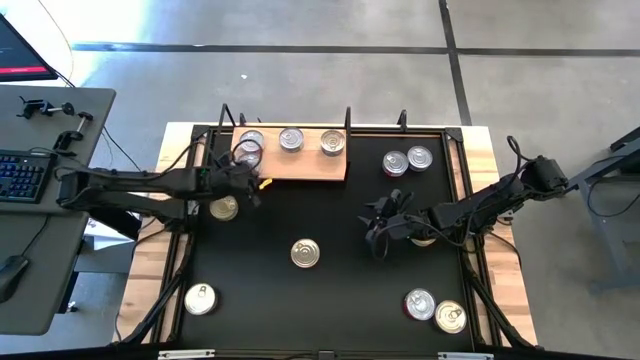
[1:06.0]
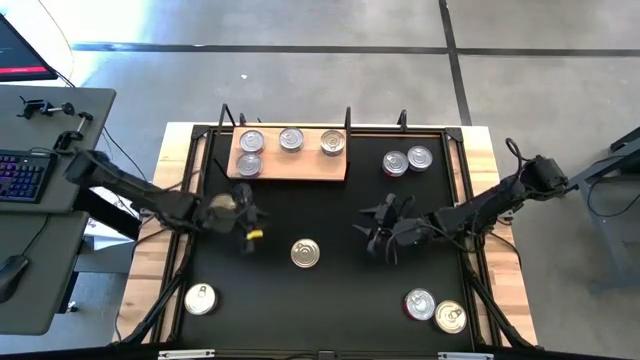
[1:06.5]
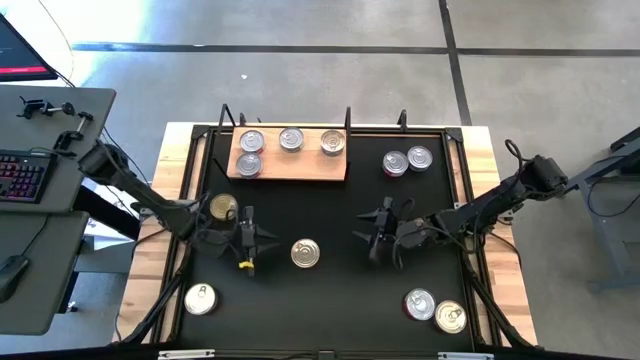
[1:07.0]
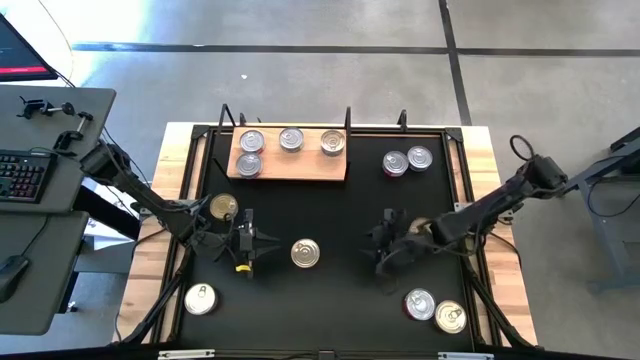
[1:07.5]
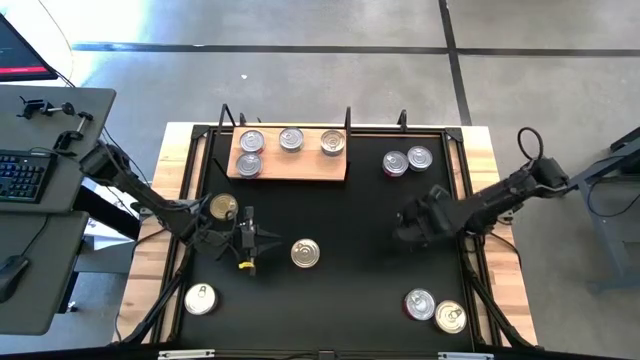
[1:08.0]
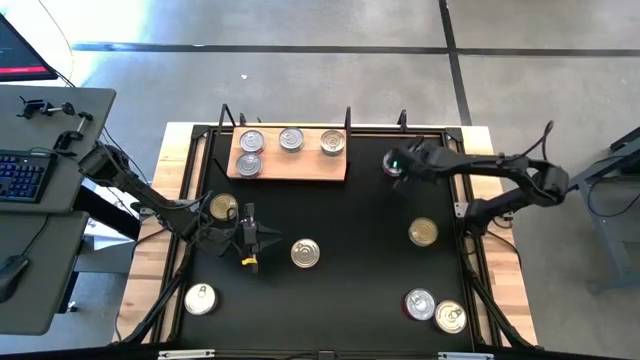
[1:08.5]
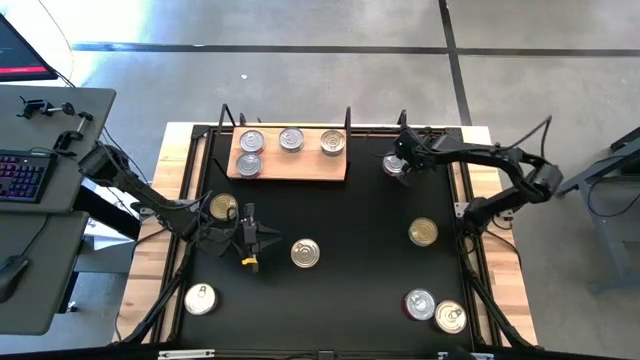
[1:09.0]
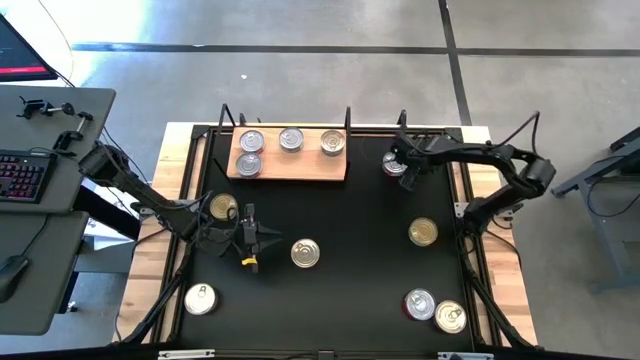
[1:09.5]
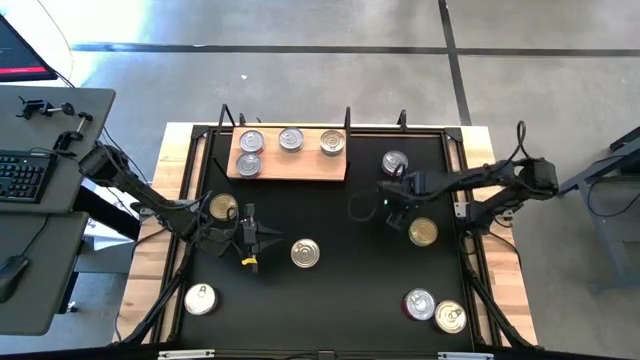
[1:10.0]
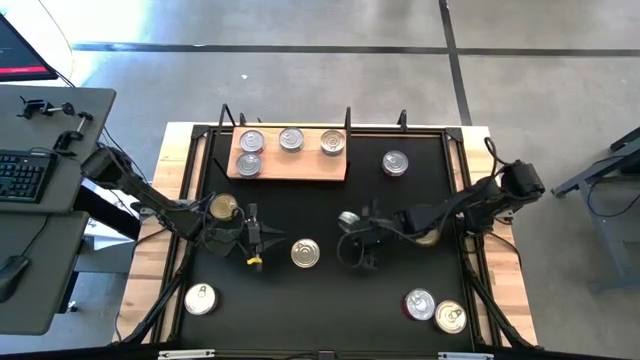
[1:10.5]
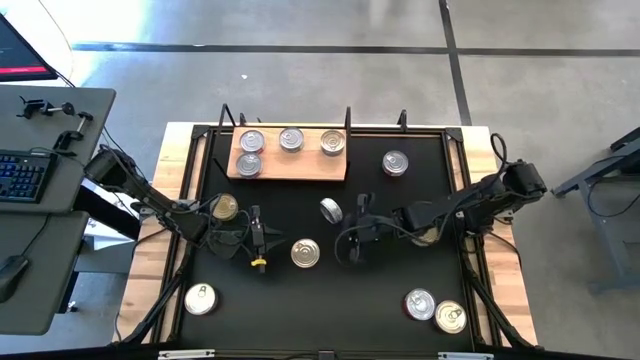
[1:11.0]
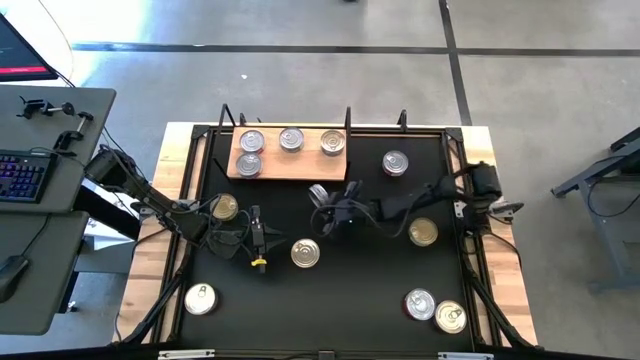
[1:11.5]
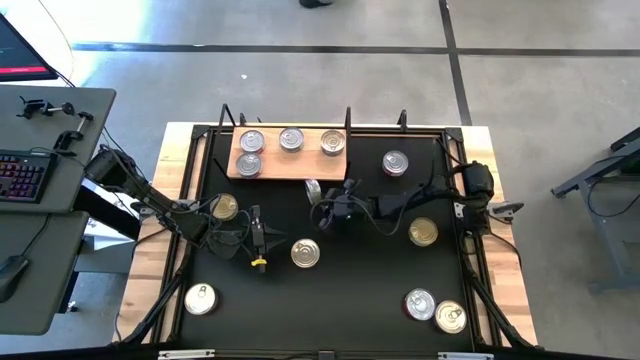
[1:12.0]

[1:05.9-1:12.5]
Task: Stack canned seafood by type on shelf
Put the green tuna can on the shelf aligned with the green tuna can

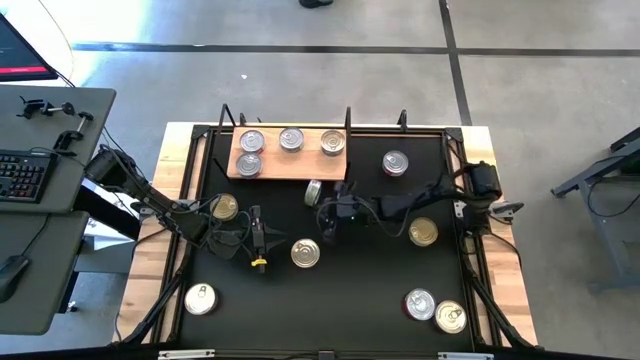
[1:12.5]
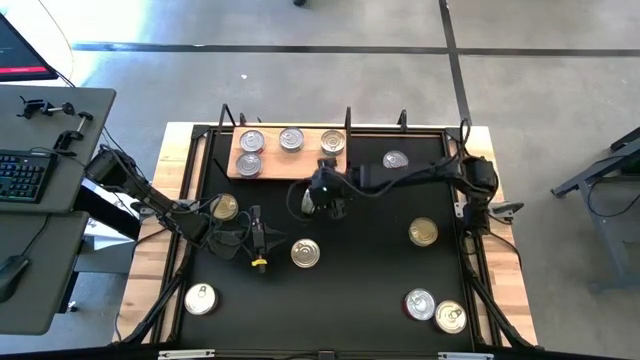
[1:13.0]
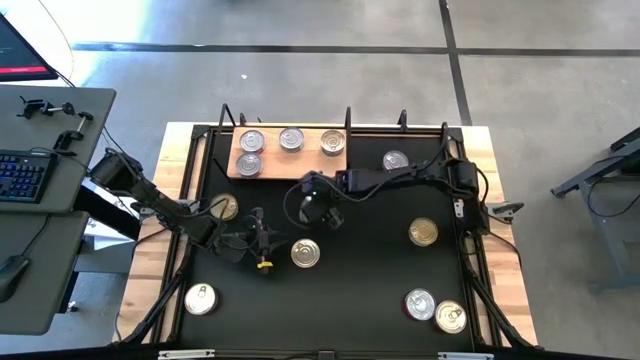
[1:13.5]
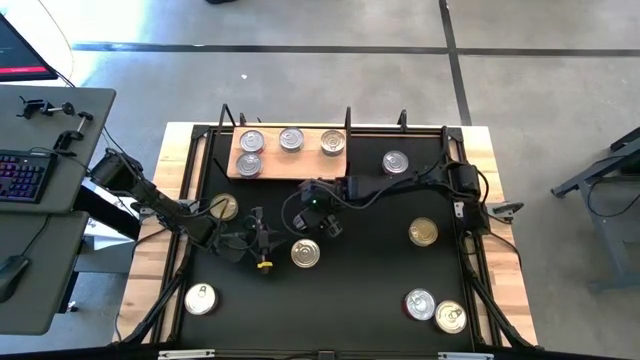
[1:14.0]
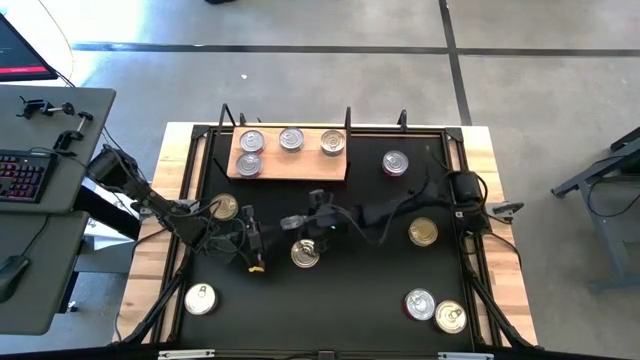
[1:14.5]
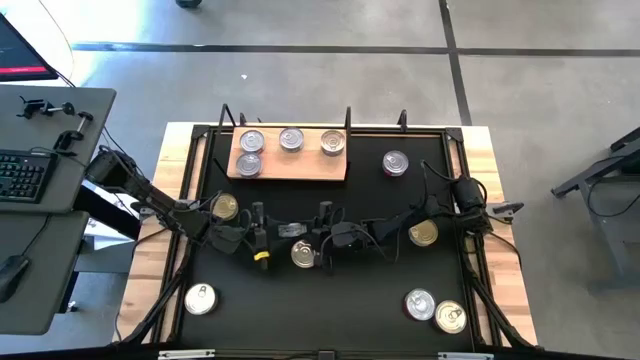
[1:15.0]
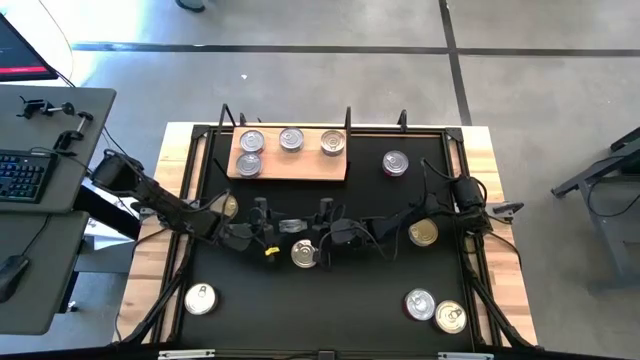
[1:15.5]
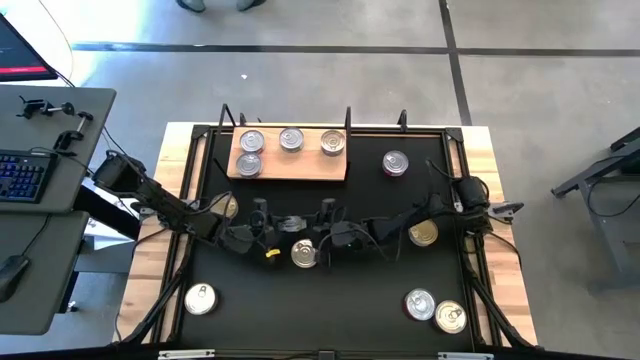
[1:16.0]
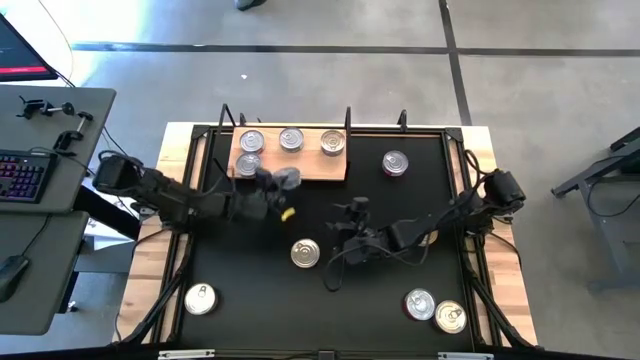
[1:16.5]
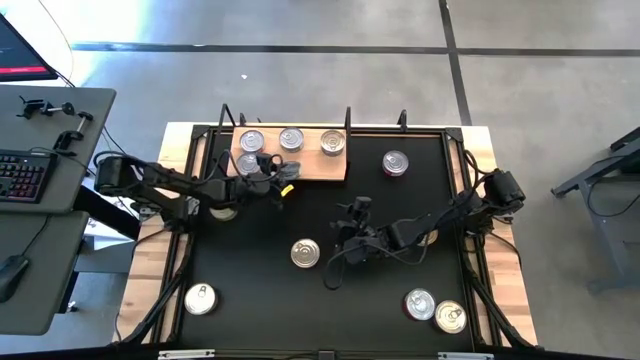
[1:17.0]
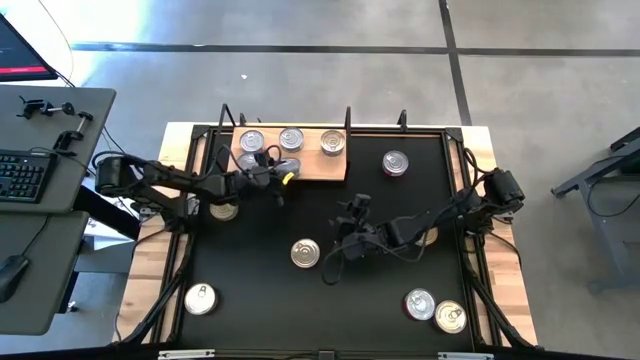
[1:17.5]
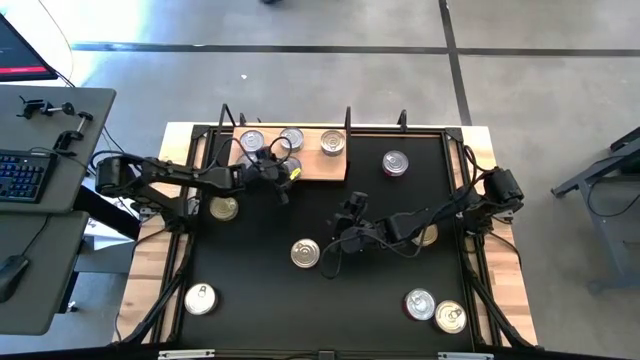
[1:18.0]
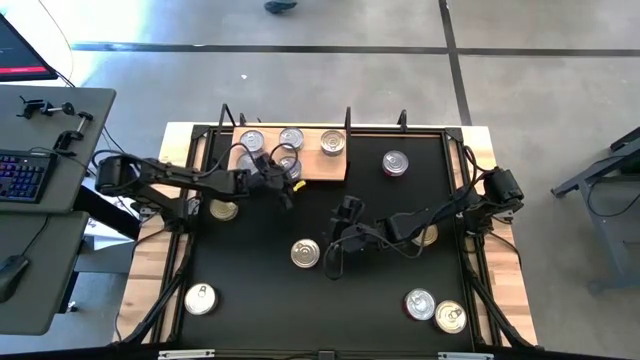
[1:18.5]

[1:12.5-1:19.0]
Put the green tuna can on the shelf aligned with the green tuna can

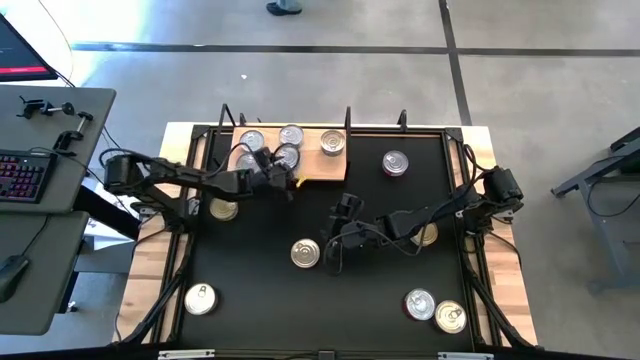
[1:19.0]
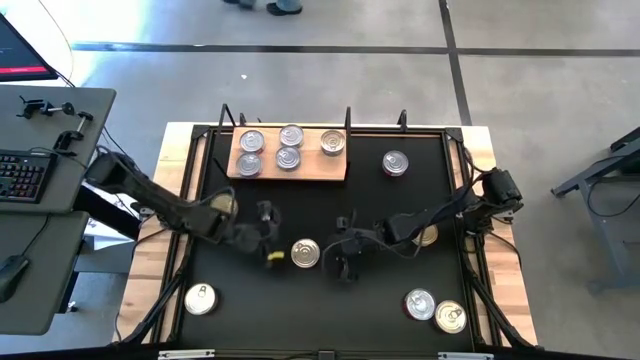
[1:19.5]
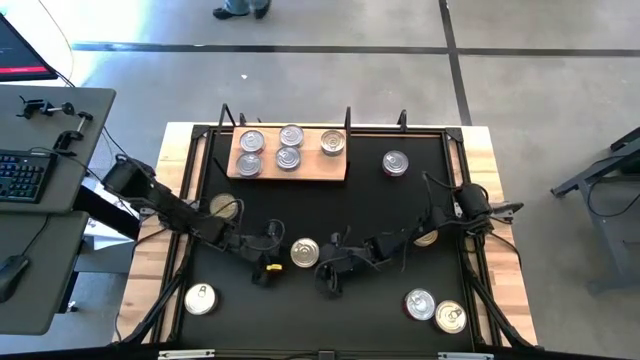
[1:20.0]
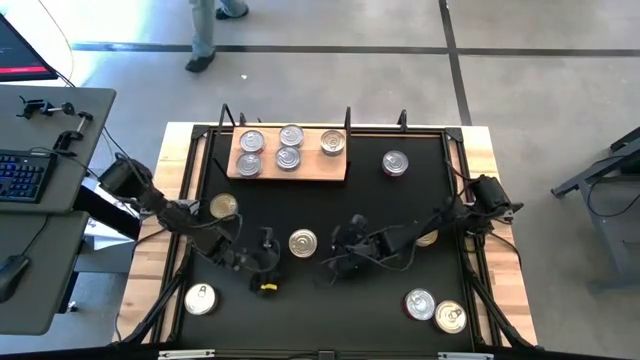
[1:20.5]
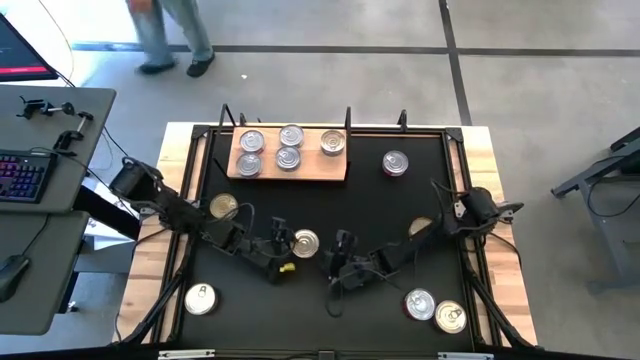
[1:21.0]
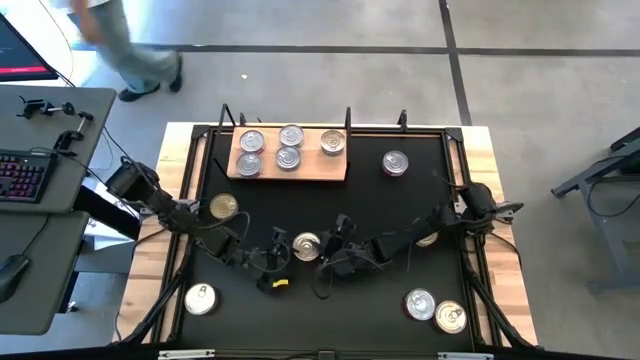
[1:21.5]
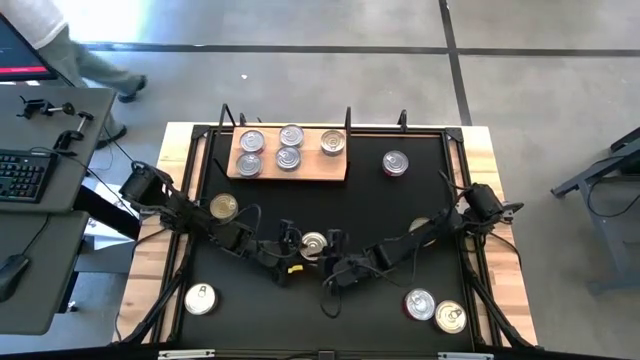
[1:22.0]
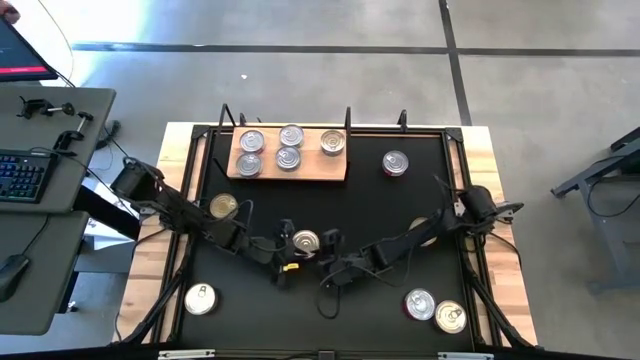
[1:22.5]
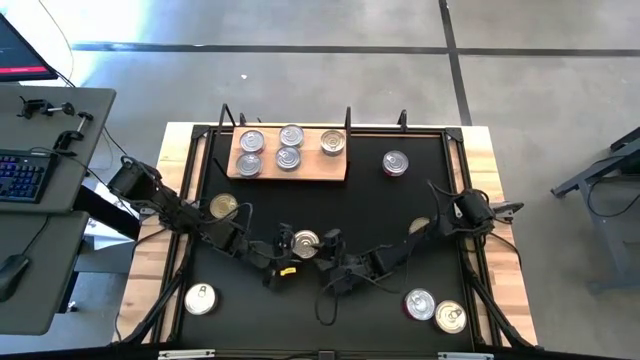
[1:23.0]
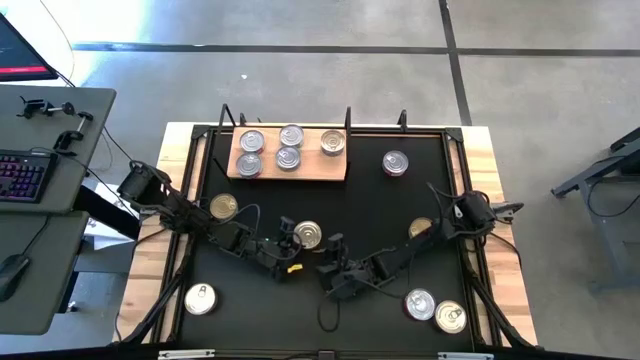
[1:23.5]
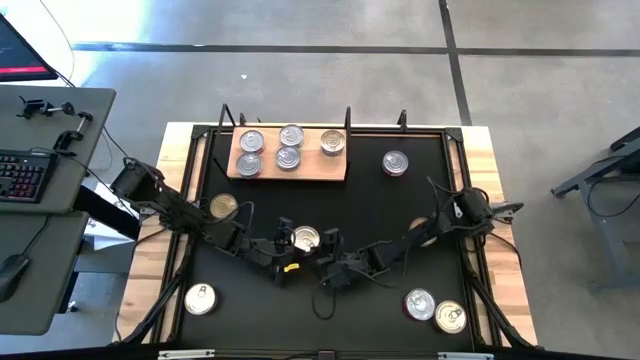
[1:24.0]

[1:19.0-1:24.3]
Put the blue pink tuna can on the shelf aligned with the blue pink tuna can

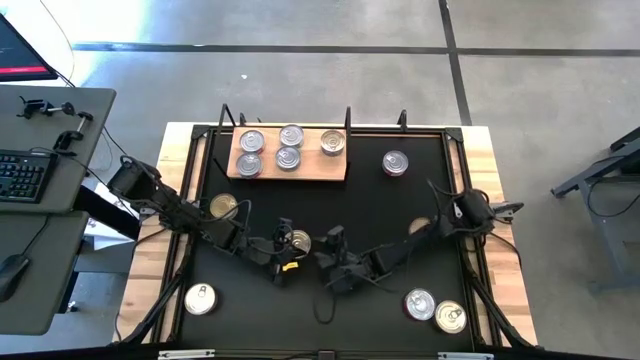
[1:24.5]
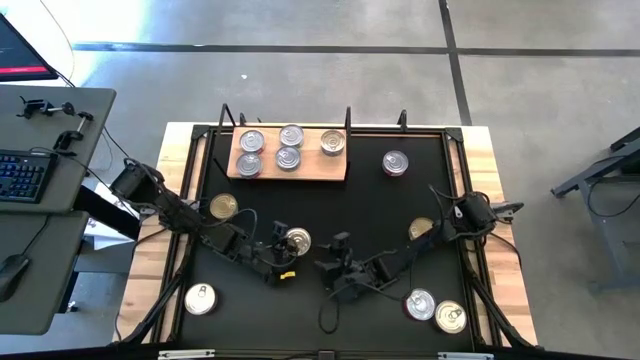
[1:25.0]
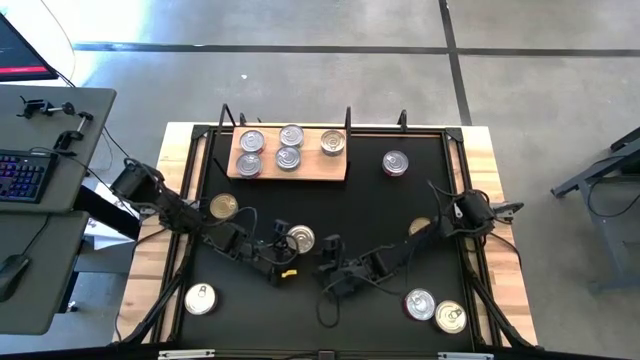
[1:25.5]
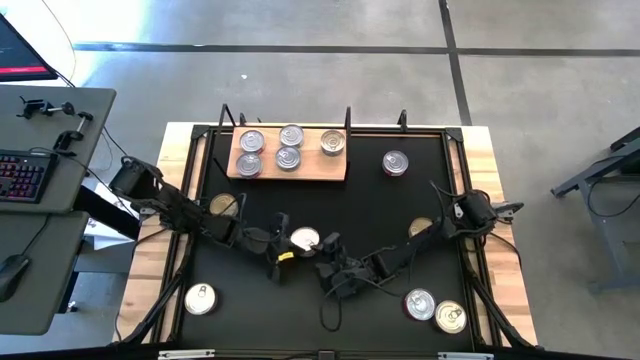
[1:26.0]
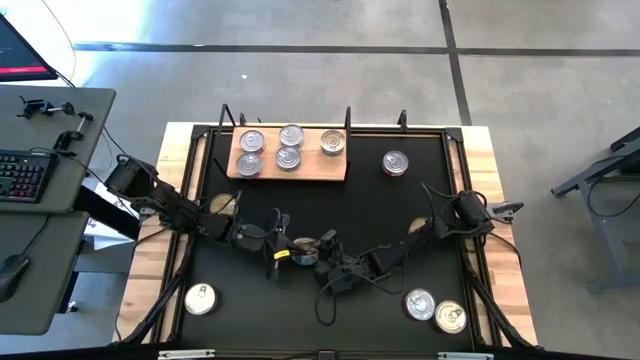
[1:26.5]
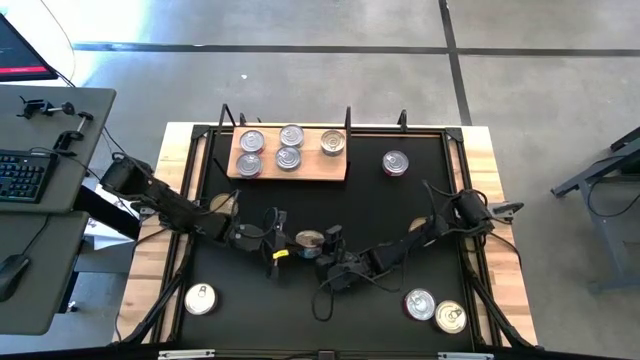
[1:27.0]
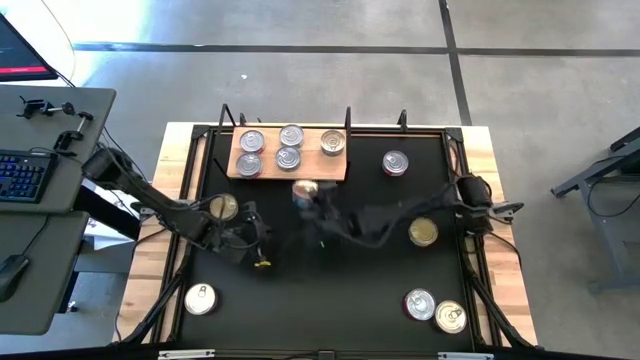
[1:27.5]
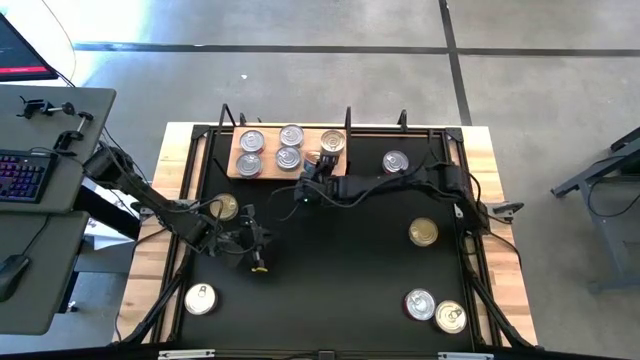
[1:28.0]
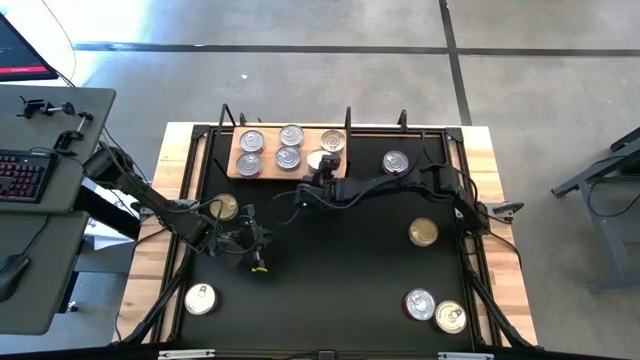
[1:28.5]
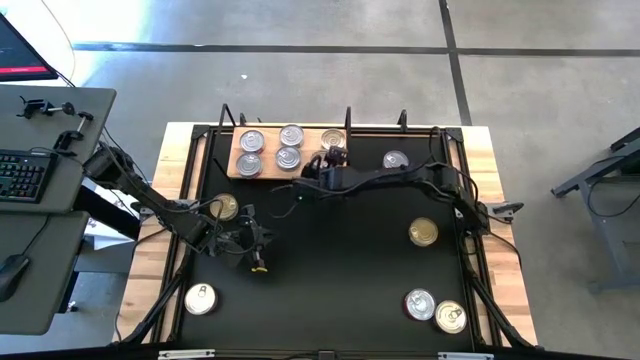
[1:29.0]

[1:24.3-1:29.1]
Put the blue pink tuna can on the shelf aligned with the blue pink tuna can
